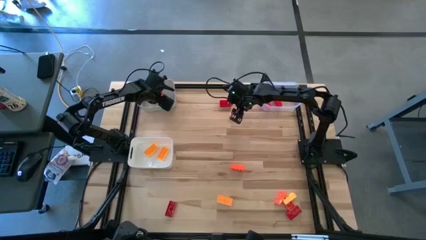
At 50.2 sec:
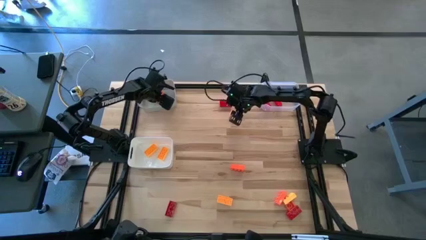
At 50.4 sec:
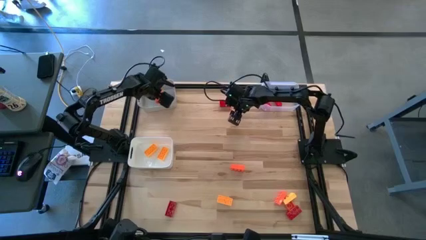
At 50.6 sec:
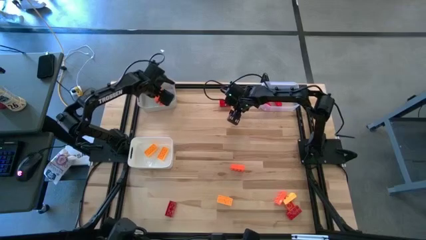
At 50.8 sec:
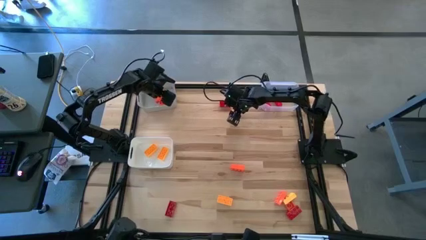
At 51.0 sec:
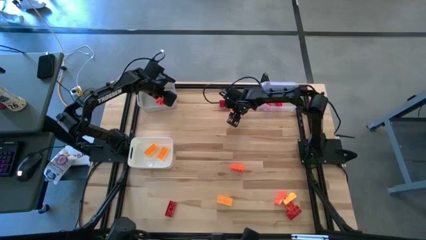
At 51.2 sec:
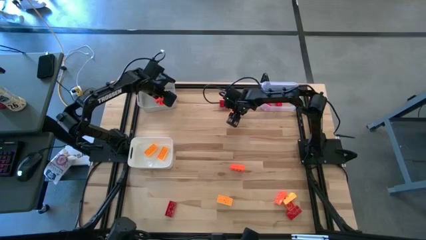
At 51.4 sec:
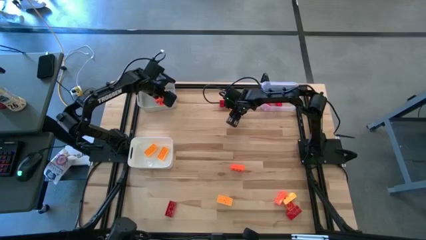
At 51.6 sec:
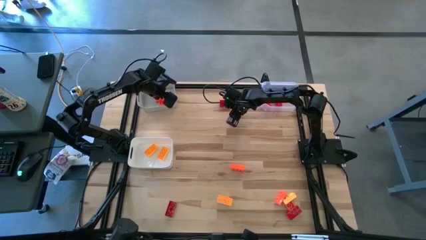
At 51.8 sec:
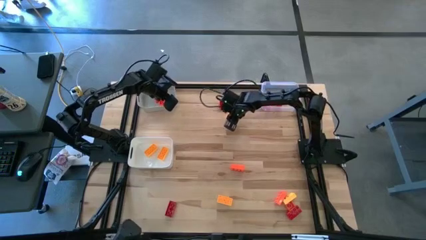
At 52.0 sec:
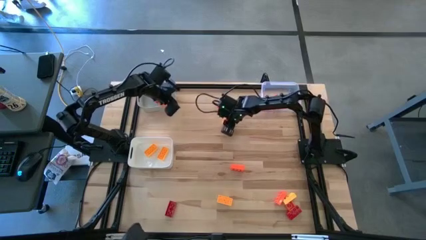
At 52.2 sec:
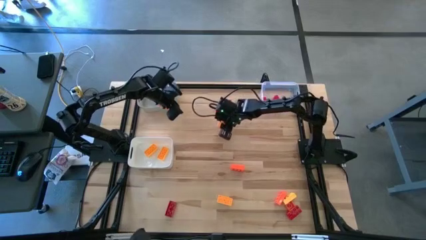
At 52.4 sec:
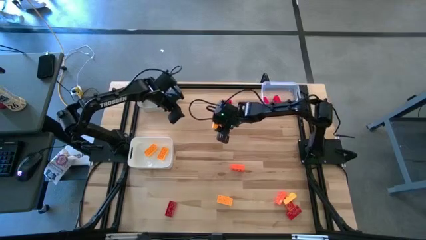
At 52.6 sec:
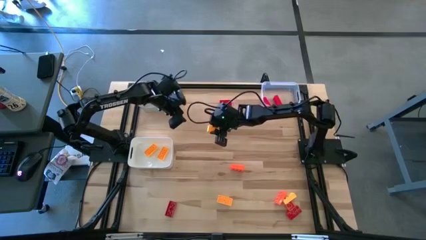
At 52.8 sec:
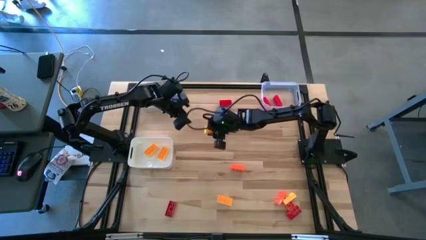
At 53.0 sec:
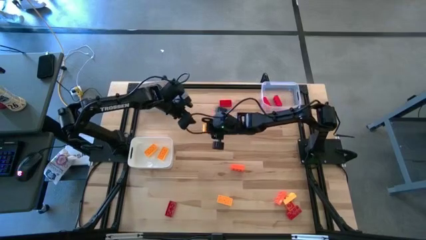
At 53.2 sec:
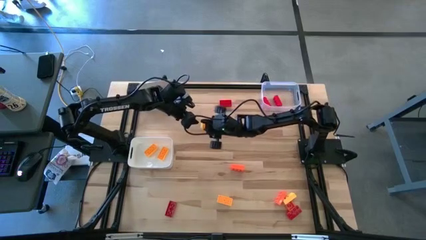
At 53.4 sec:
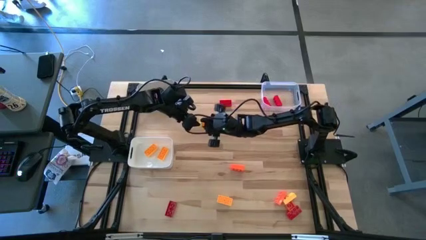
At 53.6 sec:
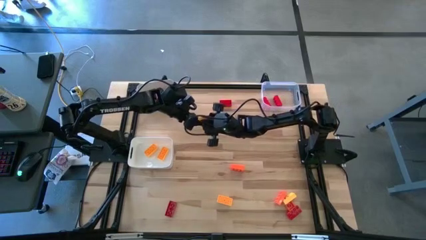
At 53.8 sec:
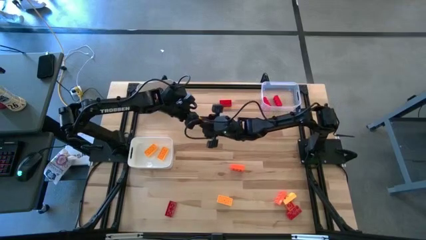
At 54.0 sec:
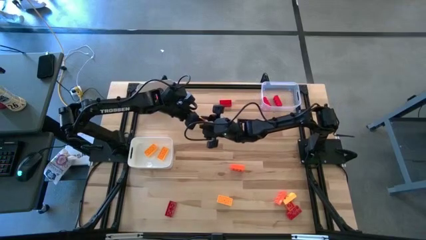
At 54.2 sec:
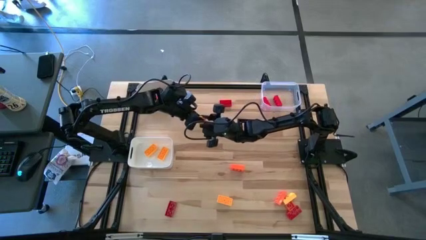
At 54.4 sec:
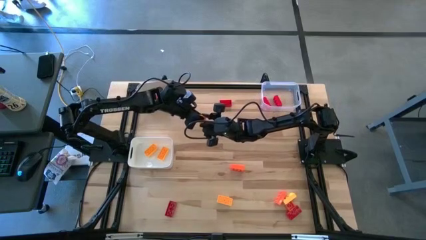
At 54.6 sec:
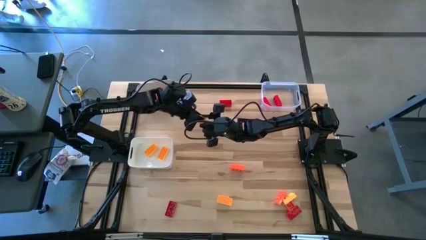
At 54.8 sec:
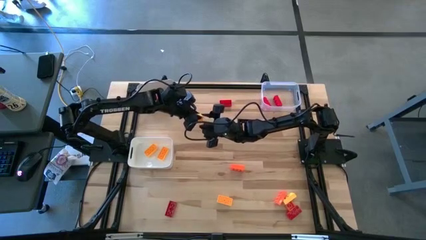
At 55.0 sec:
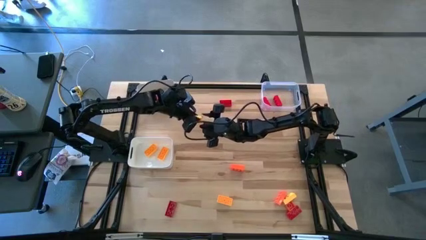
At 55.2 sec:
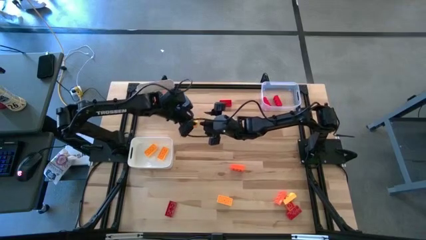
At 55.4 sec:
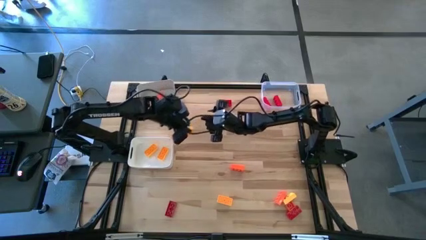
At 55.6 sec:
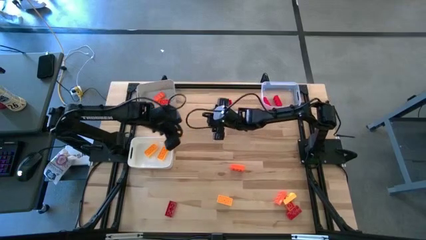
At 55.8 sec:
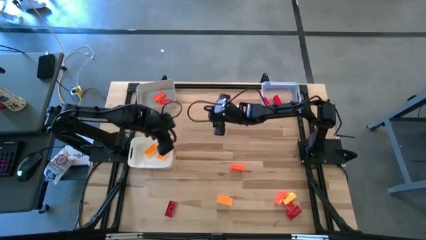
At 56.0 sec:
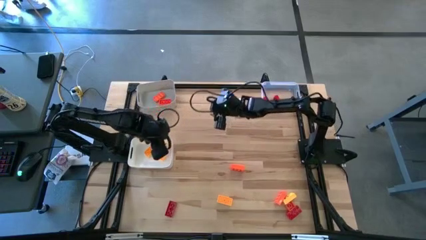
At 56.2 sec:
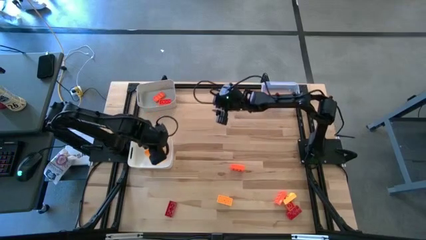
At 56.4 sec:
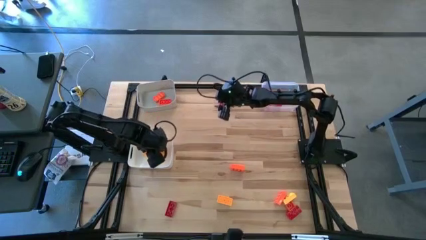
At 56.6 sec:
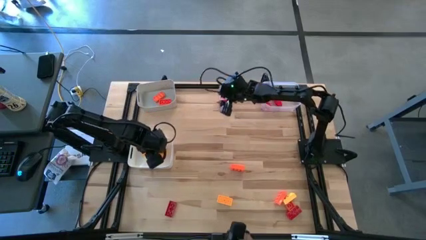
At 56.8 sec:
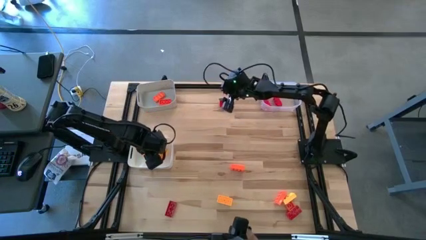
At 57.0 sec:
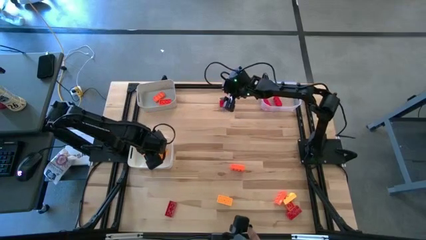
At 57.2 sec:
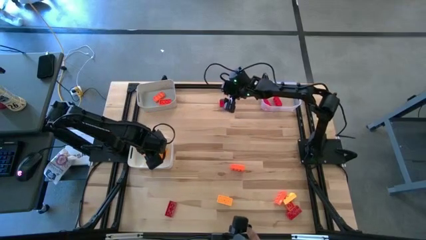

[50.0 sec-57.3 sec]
Task: Sort & place blocks by color
Put the yellow game piece into the white bin

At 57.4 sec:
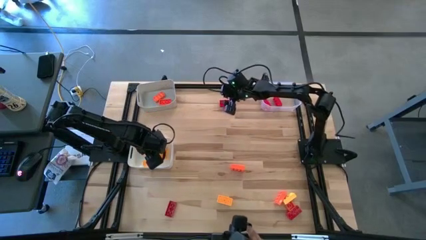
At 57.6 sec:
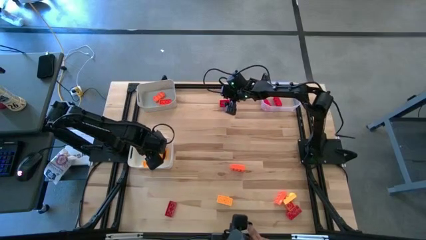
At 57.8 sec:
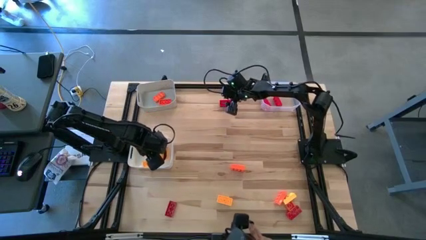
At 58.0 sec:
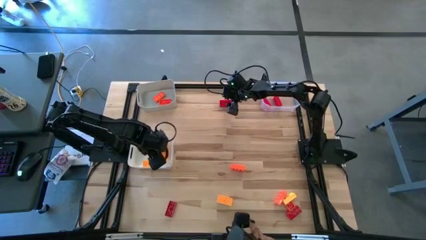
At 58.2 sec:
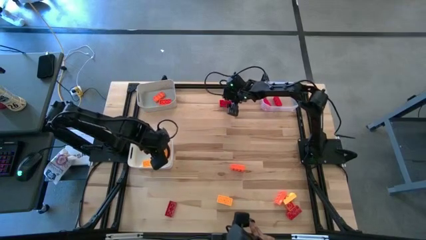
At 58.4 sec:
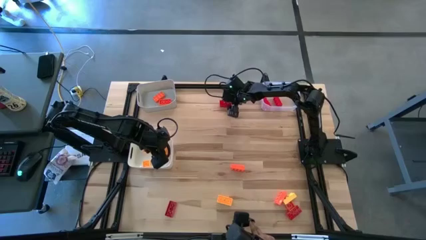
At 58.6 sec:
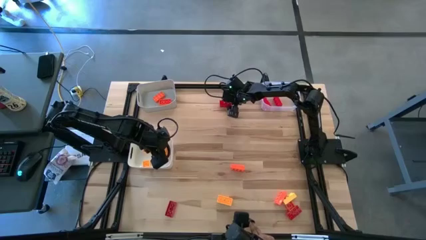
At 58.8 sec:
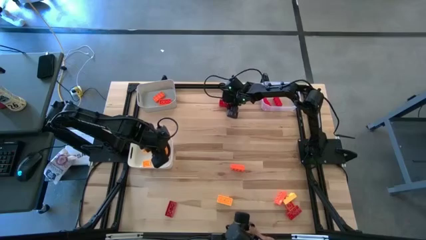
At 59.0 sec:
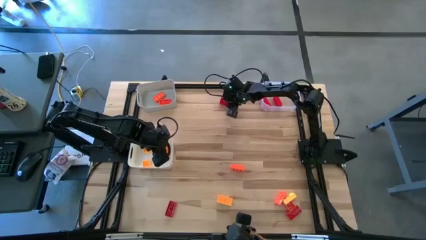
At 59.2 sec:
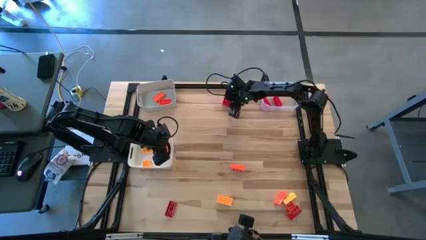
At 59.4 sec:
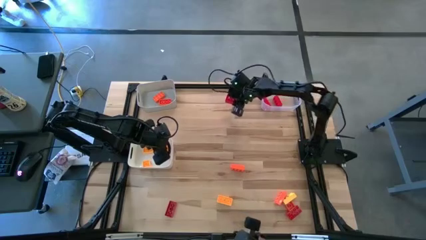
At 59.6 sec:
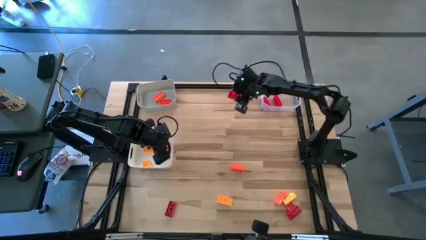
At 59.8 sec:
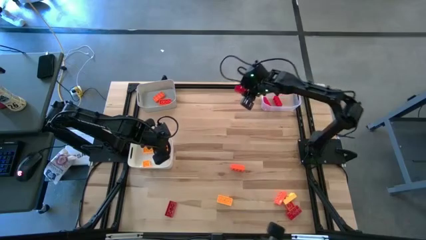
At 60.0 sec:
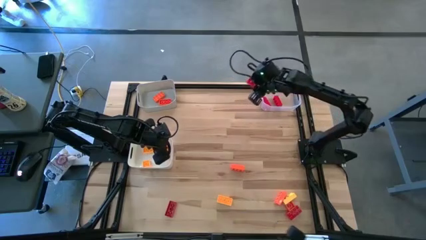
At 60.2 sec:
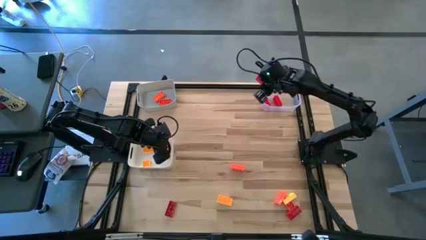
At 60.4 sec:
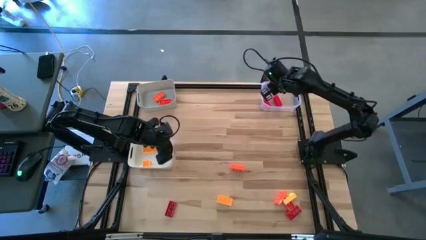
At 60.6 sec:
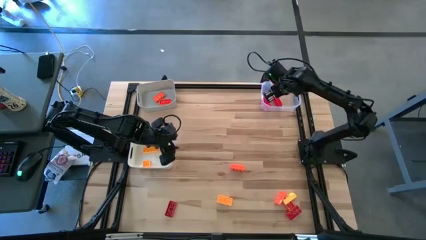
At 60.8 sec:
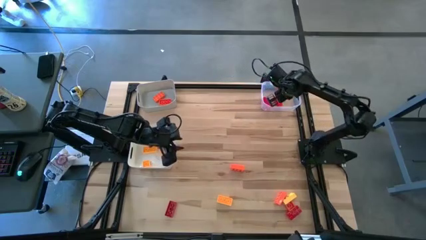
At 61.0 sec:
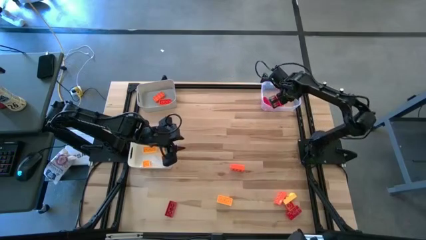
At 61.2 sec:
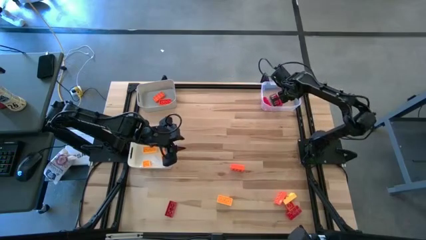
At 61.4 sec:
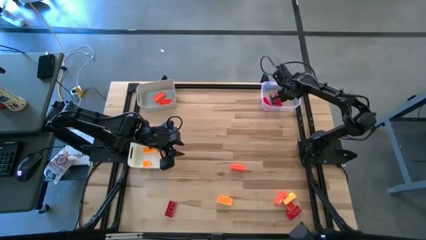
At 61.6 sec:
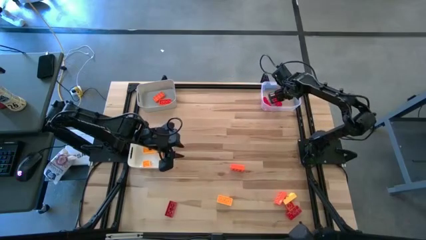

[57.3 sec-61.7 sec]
Put the red game piece into the transparent bin

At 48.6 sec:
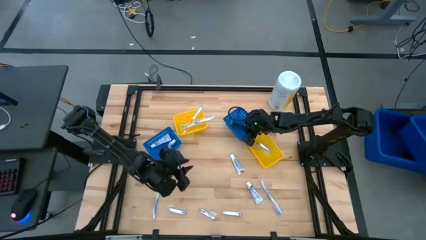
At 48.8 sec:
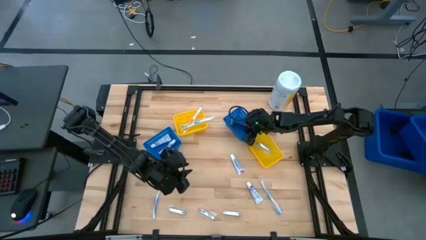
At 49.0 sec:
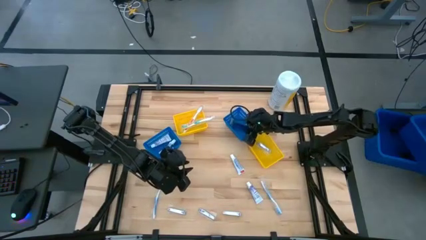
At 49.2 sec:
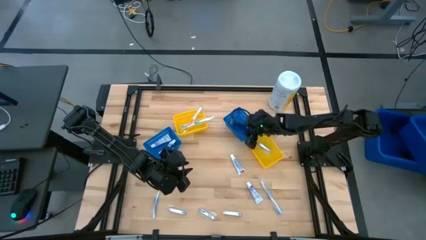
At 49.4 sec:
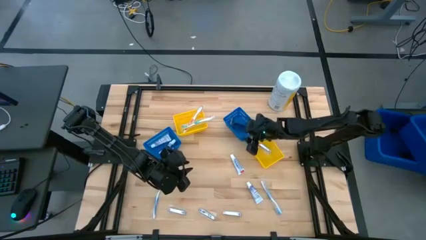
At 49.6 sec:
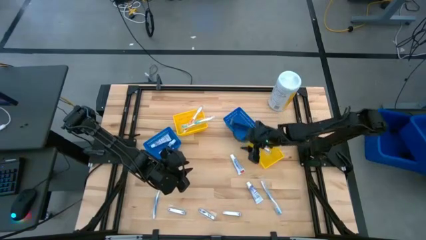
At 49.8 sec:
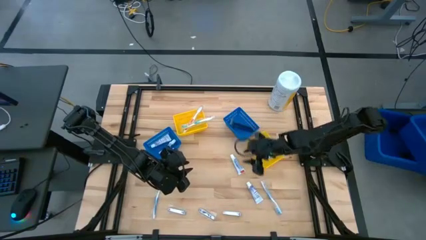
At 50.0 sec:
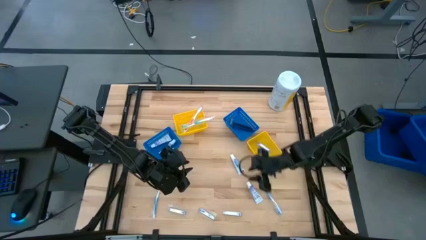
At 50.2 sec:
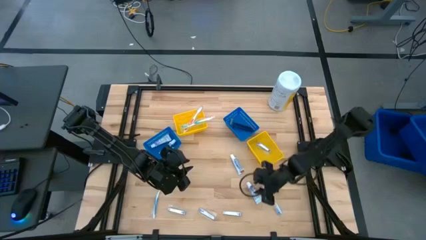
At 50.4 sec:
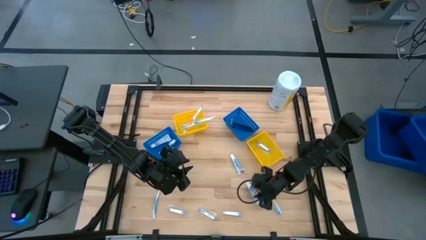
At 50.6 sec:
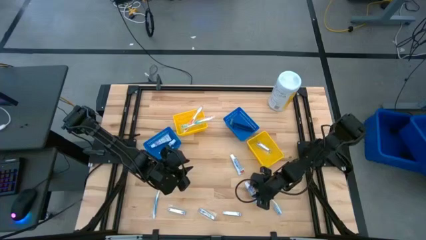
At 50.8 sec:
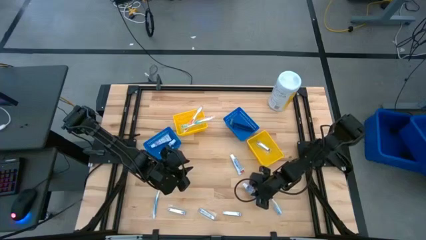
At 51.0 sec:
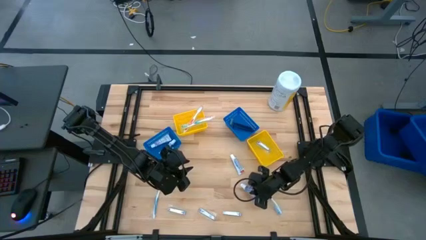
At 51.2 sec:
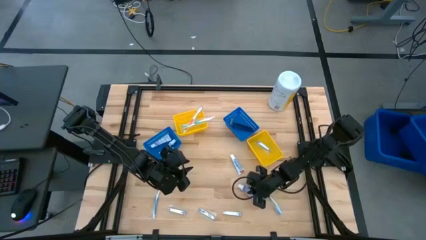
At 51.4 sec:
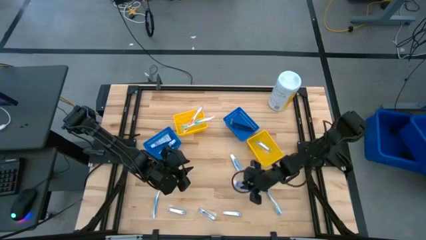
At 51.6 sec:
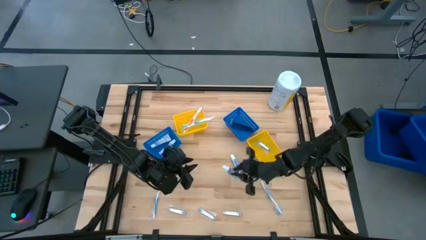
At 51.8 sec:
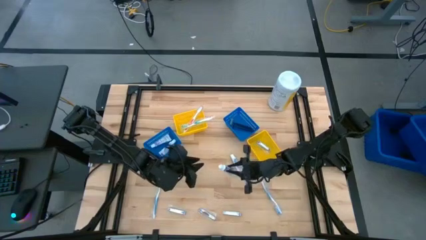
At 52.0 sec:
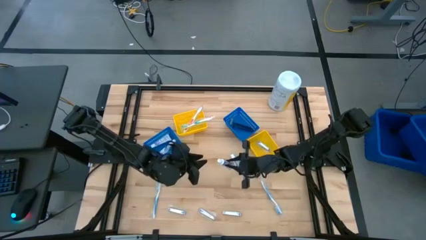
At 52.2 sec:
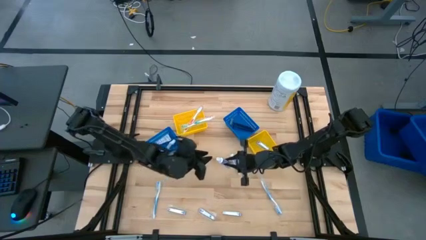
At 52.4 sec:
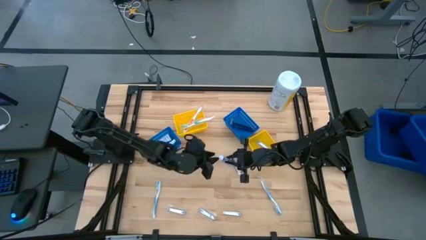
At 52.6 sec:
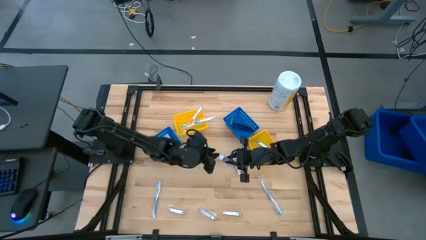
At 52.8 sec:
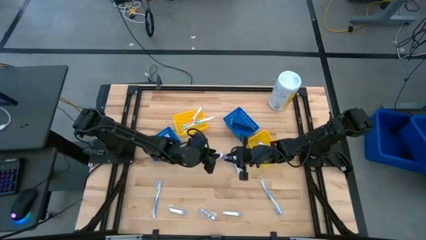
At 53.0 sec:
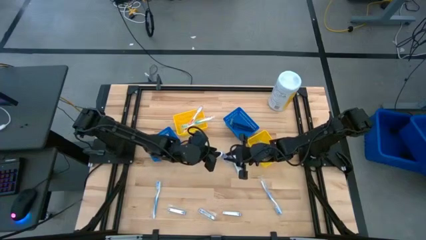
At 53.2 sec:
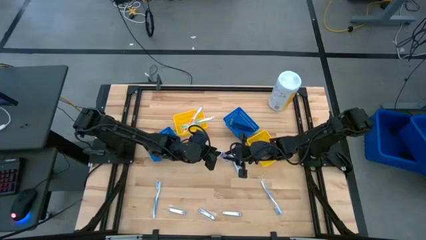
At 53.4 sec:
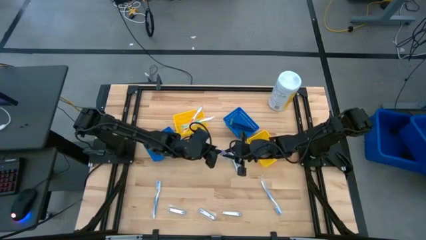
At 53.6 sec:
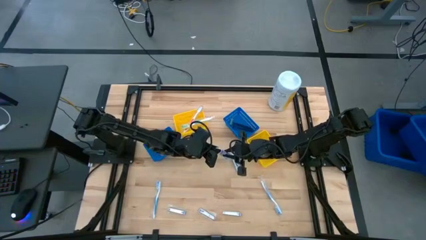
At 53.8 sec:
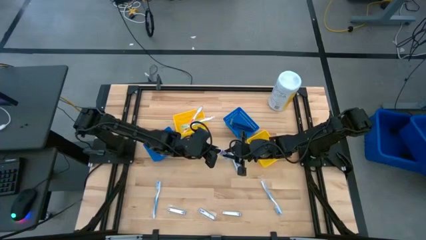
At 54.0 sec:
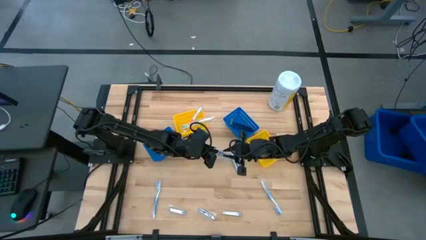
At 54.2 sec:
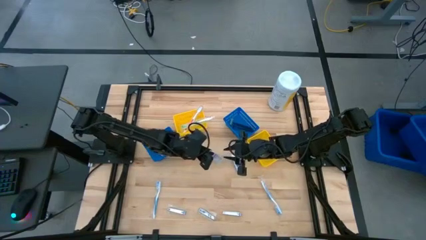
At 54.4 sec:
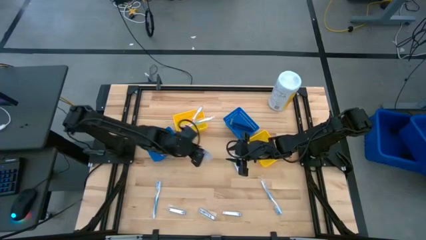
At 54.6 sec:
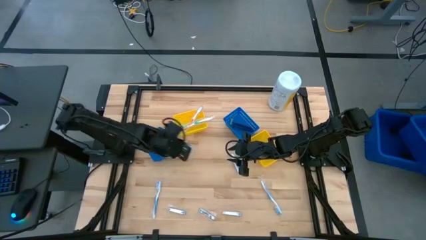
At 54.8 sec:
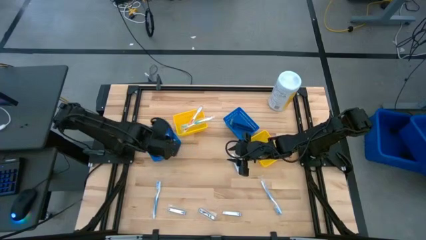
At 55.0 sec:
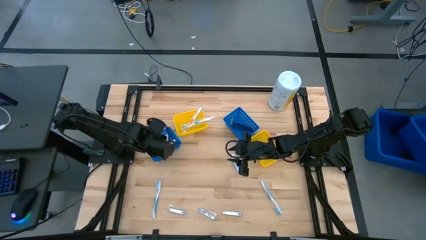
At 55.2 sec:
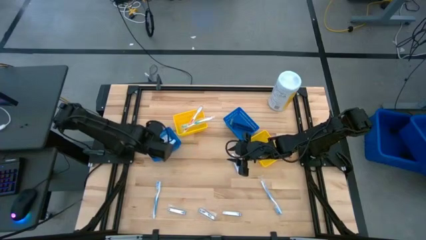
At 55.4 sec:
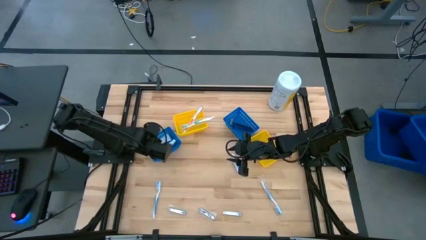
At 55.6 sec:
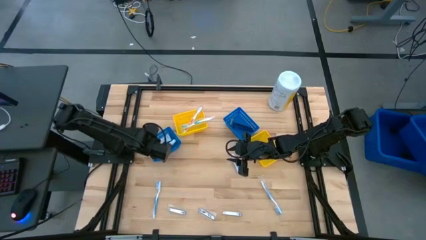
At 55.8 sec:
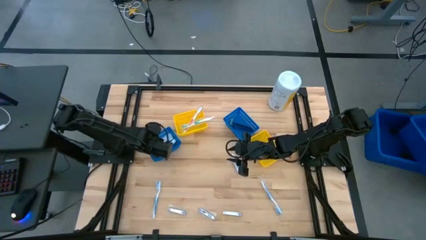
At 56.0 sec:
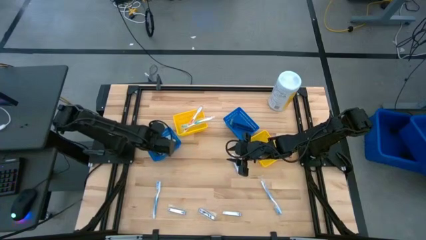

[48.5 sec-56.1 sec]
Task: Pick & Place Travel size toiletries
Put the toothpaste into the left blue bin
